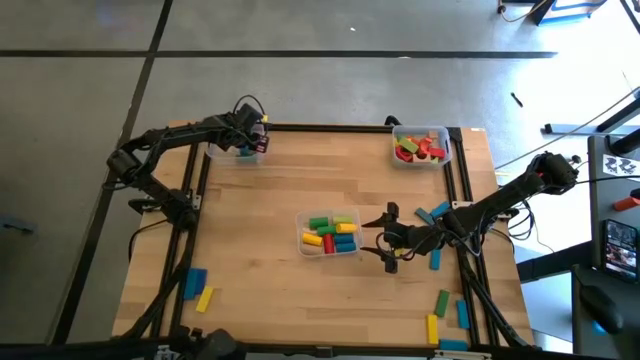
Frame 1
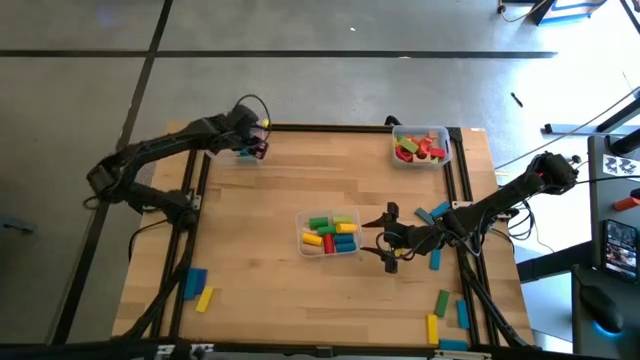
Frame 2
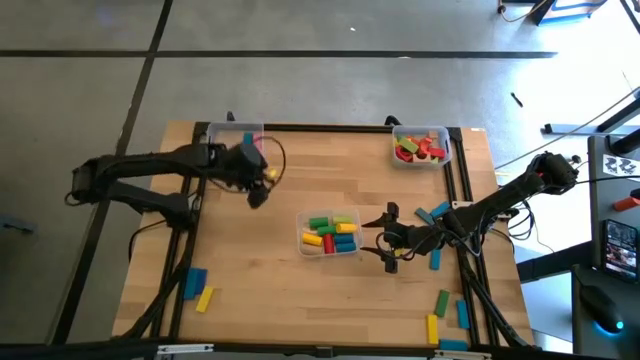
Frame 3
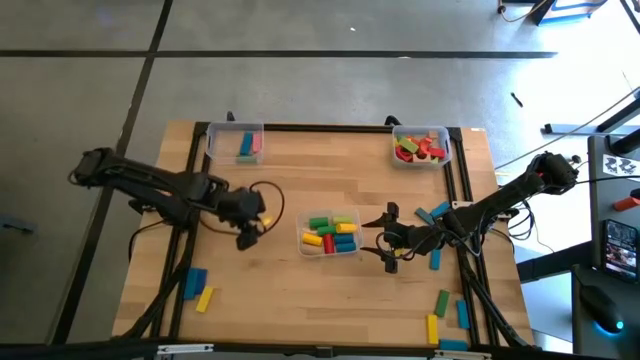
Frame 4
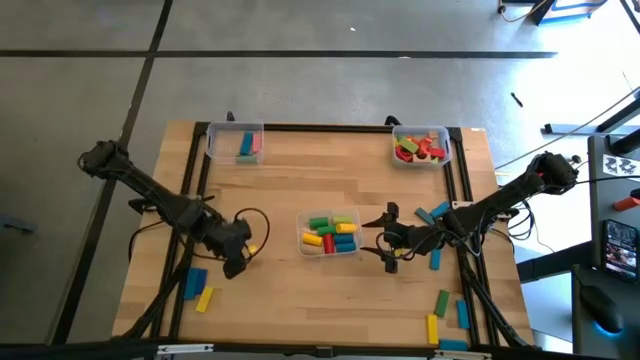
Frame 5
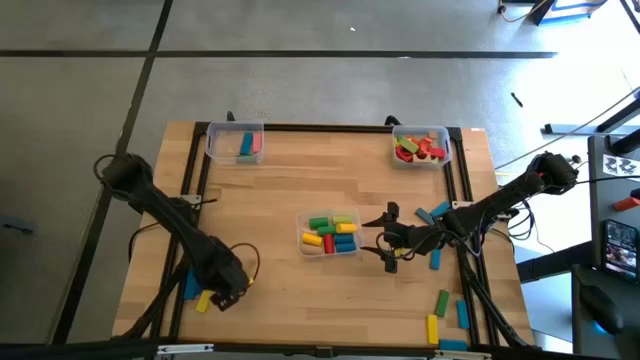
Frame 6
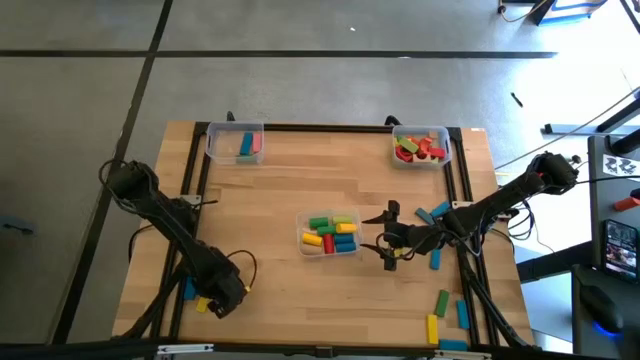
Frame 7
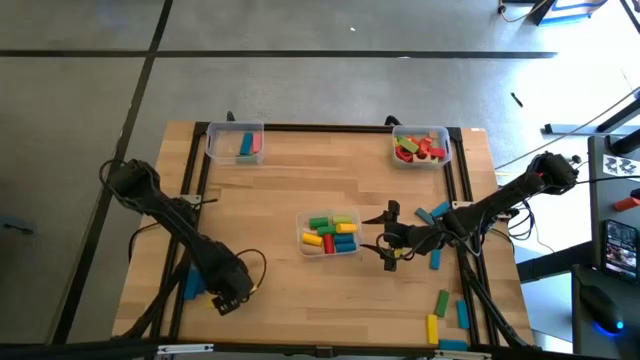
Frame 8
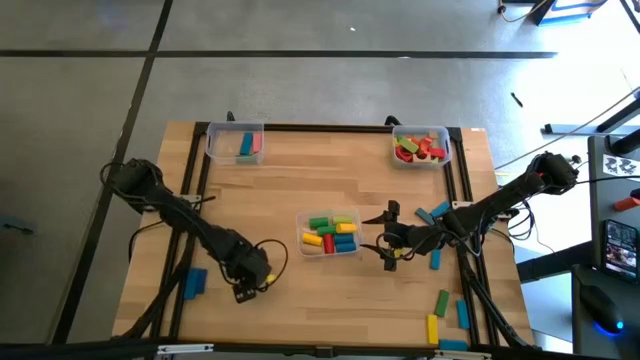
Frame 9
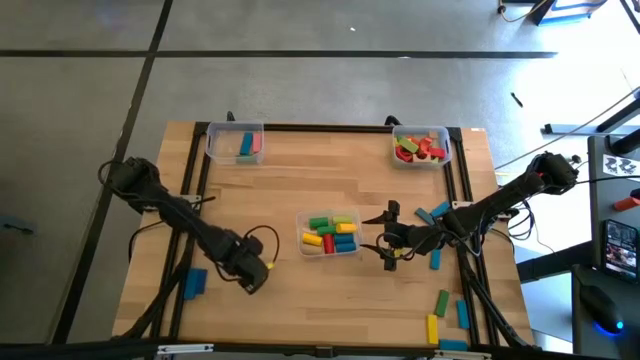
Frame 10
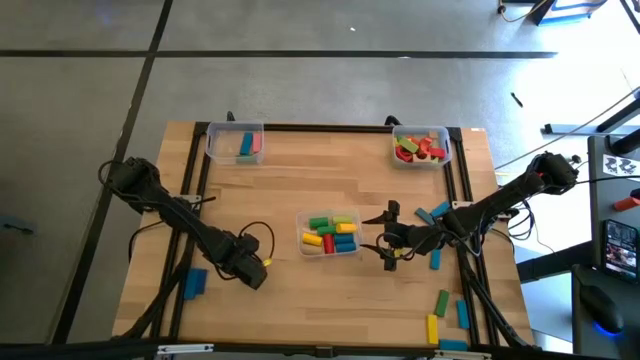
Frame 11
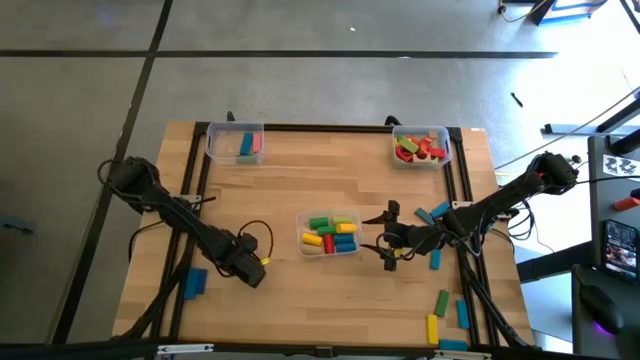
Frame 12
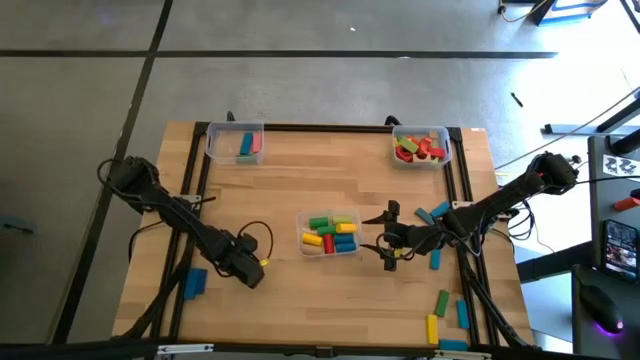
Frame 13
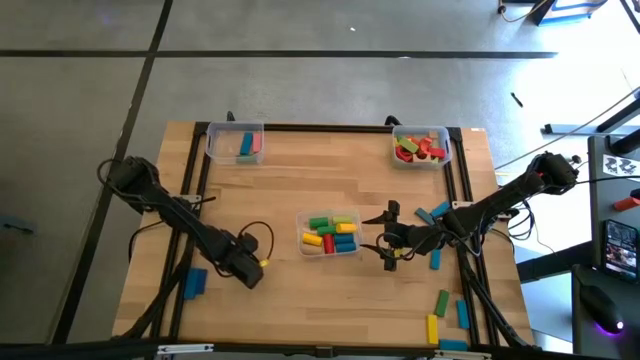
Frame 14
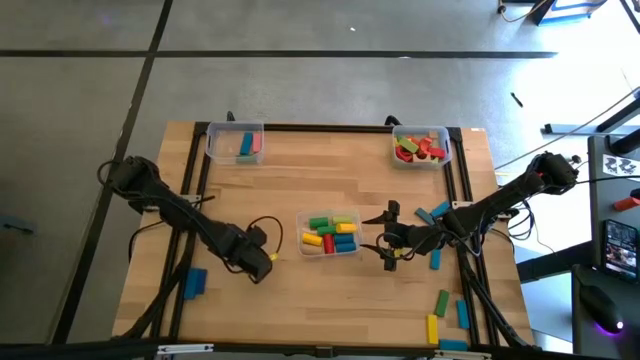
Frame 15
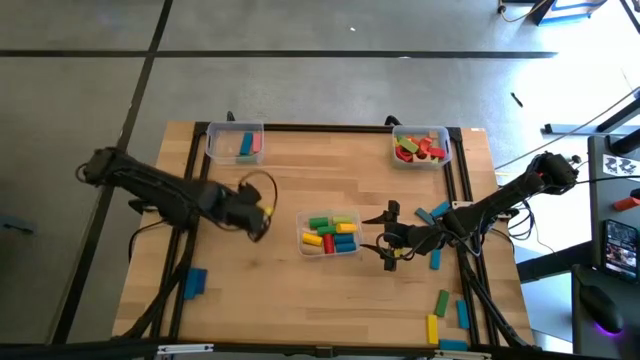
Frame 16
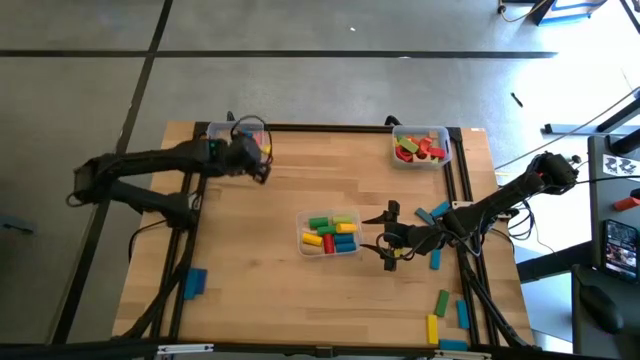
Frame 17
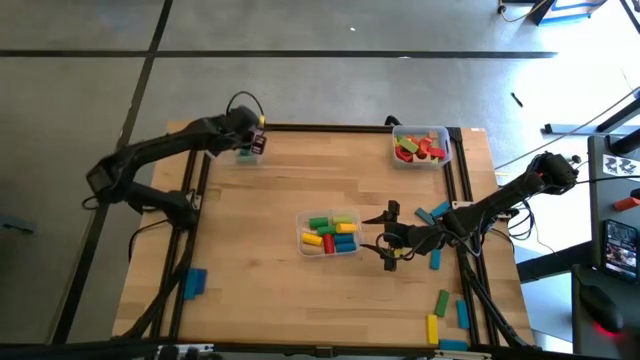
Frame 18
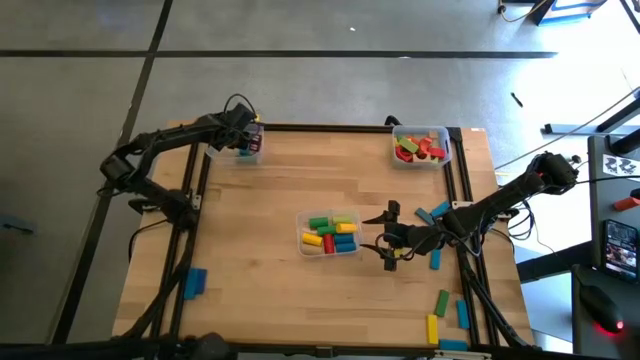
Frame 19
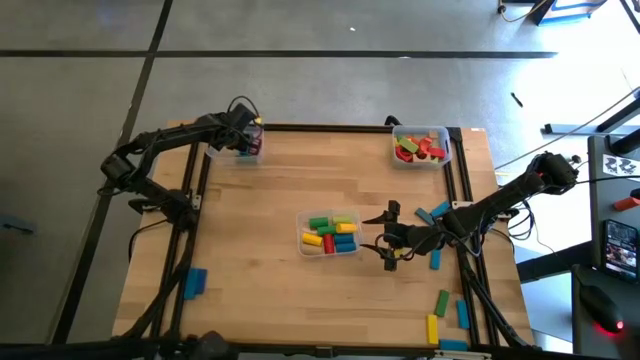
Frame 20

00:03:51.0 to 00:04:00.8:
Task: Sort blocks by size
Put the yellow rectangular block into the top left transparent bin

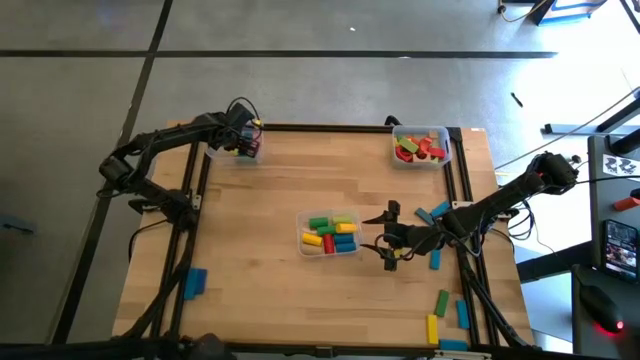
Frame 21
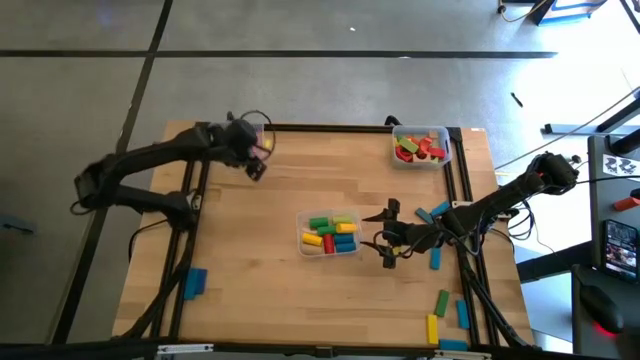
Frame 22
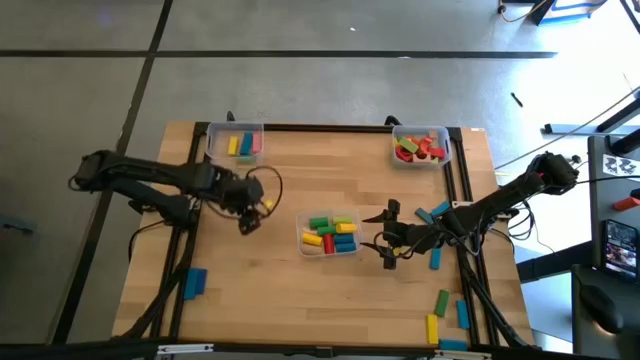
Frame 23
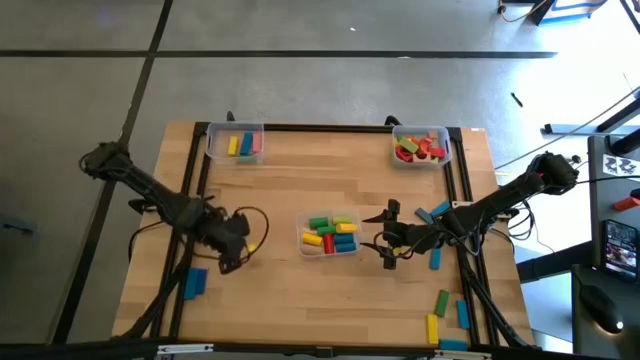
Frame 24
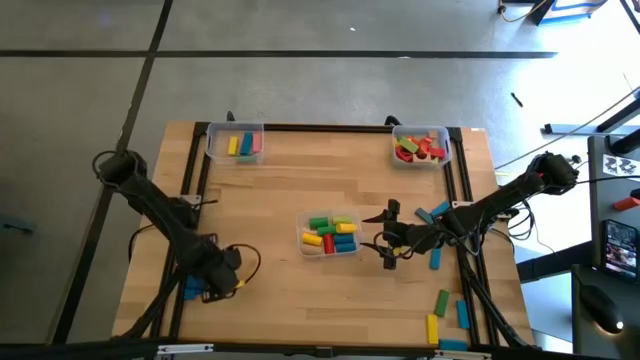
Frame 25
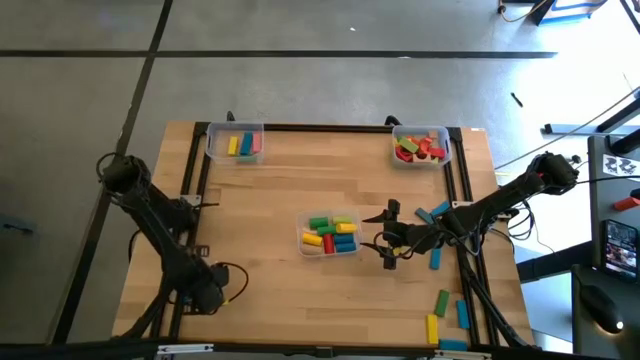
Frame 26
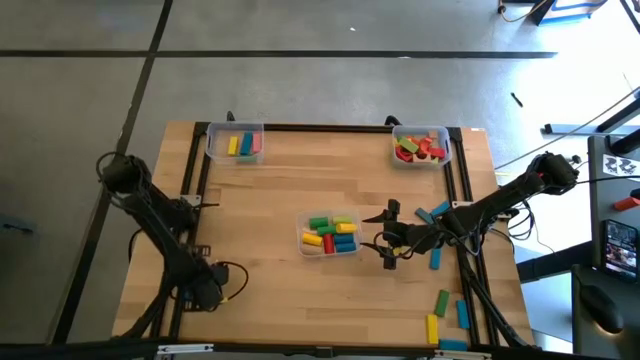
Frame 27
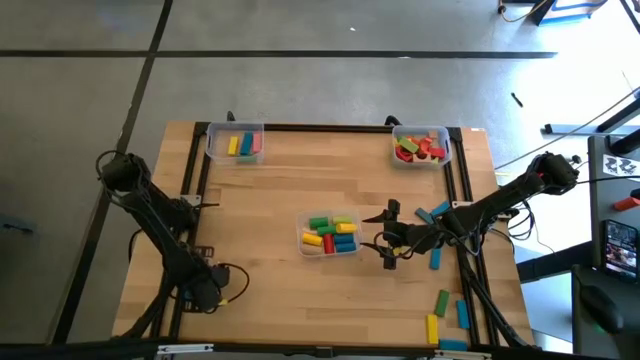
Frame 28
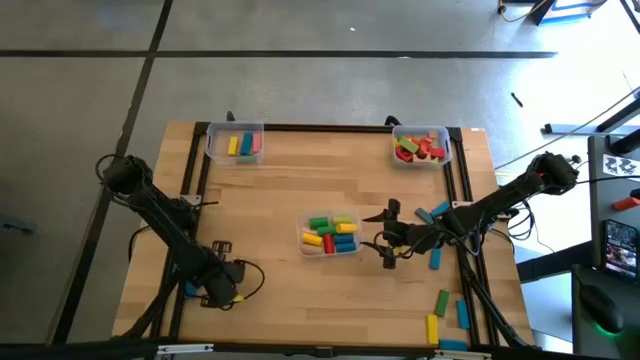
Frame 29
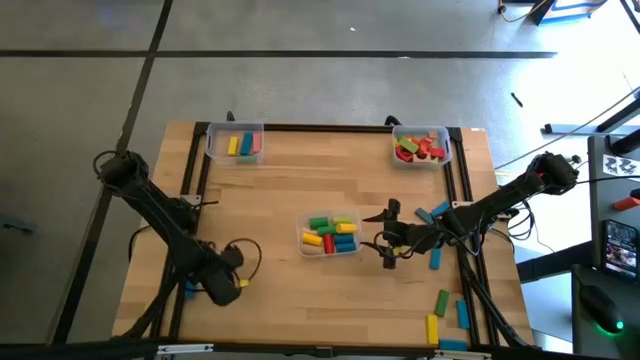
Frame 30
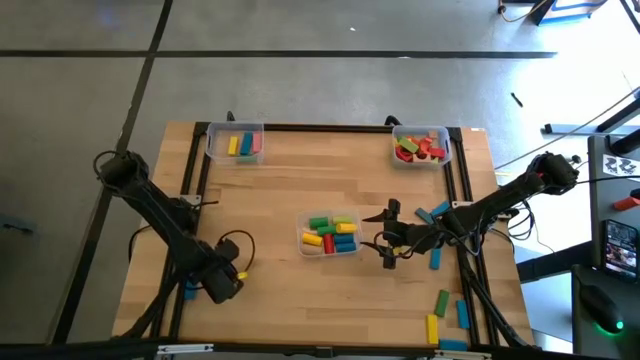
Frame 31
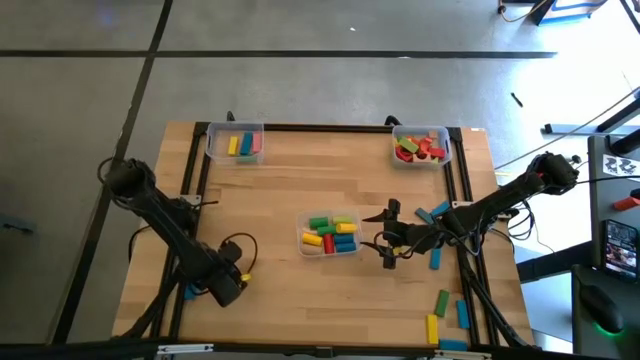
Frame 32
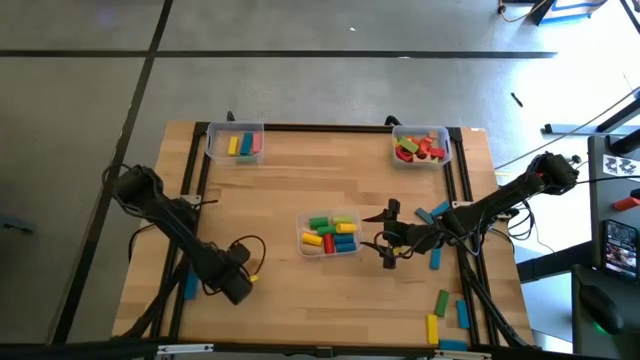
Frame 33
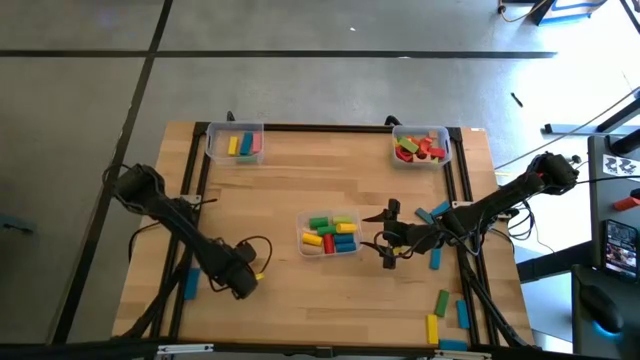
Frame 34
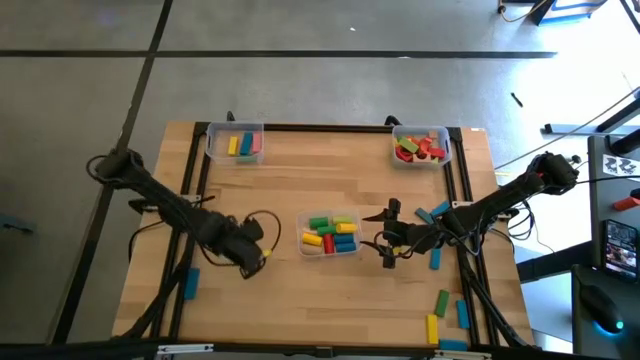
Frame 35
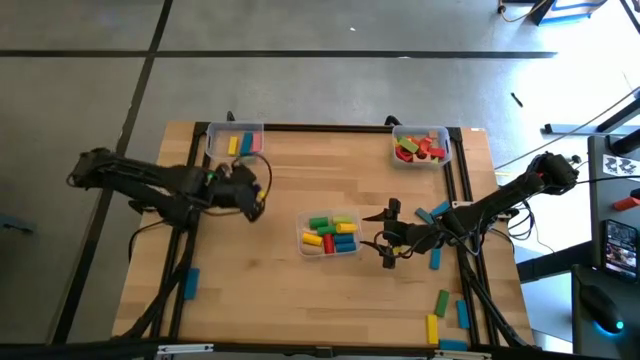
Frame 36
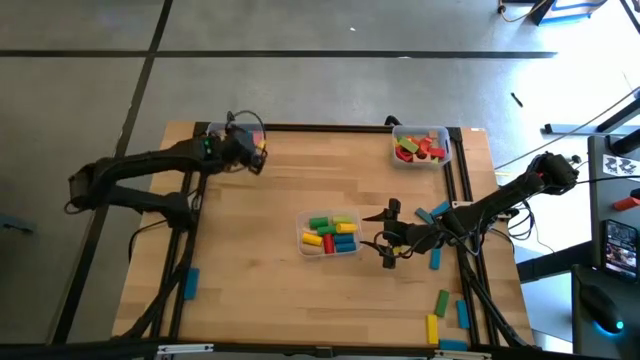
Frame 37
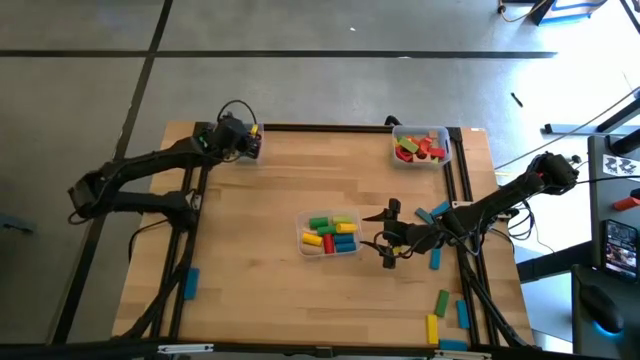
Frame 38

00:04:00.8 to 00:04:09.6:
Put the blue rectangular block into the top left transparent bin

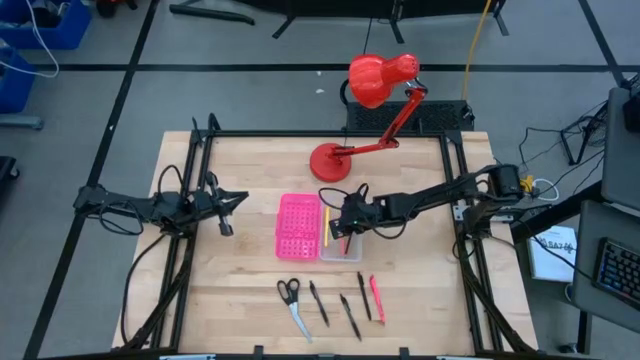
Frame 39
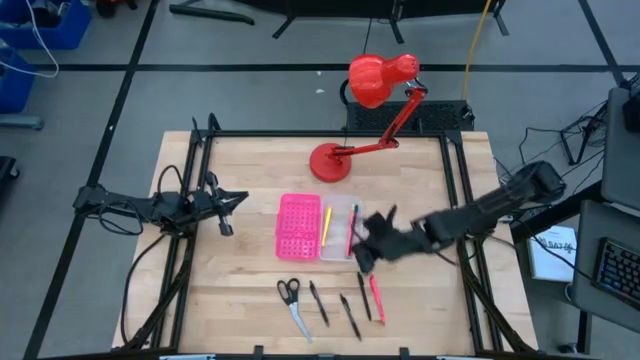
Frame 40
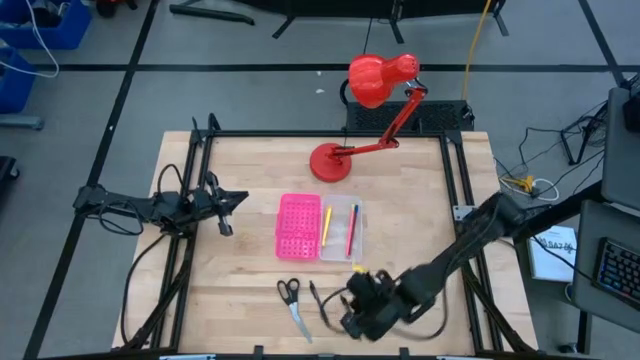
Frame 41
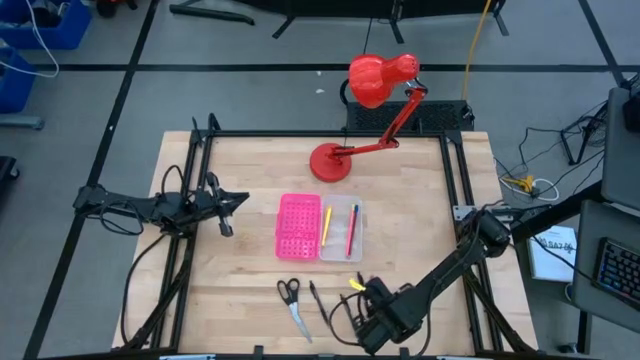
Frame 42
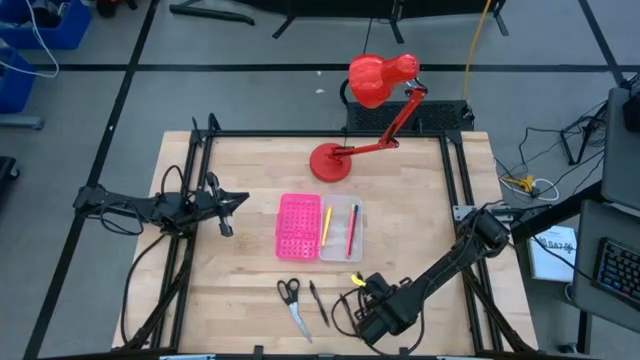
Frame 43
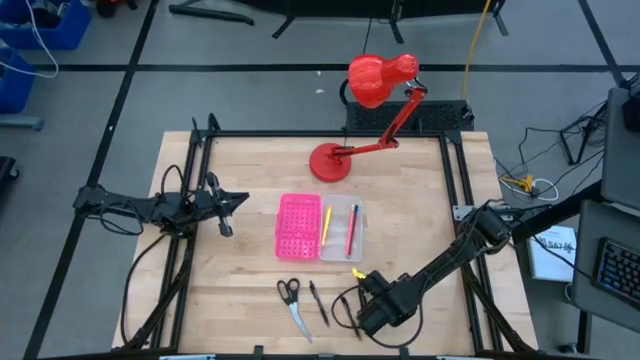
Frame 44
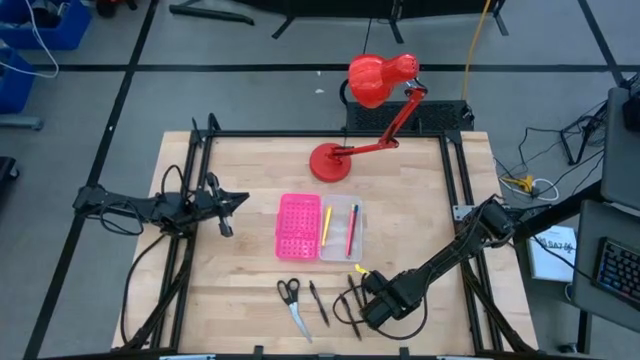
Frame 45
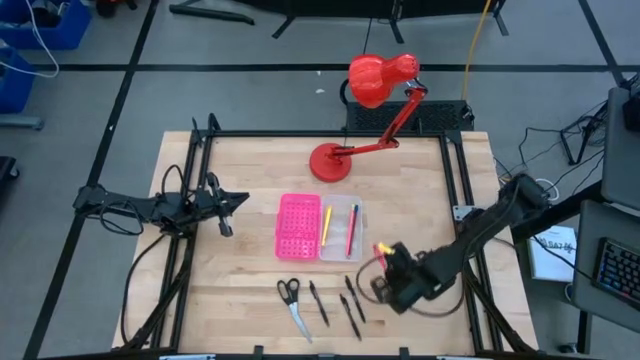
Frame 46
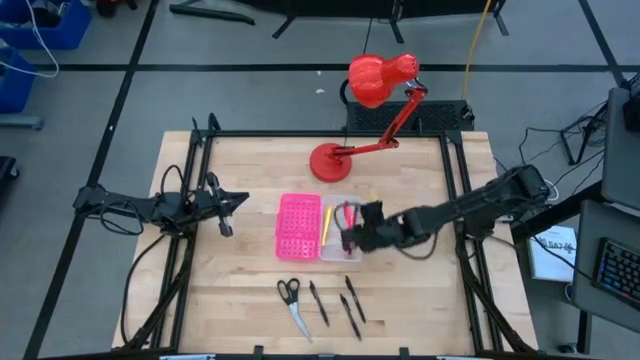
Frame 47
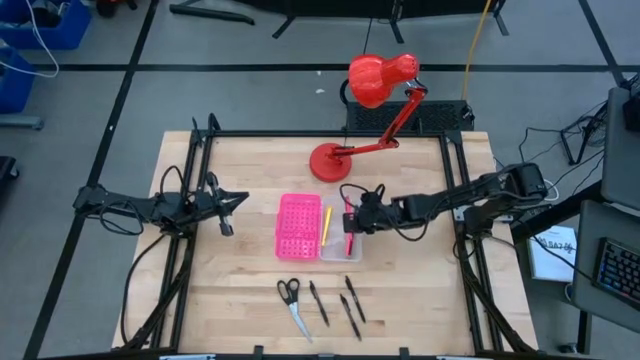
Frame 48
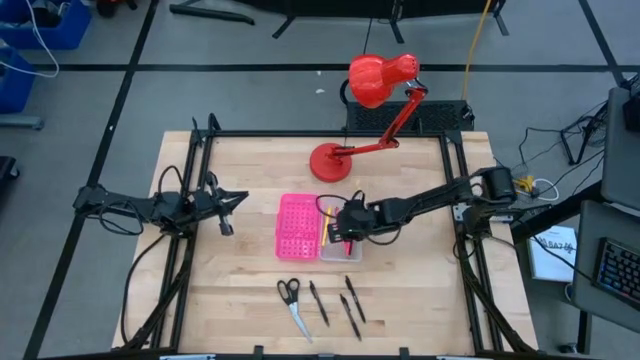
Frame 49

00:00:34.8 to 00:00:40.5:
Task: Pick & place school supplies into a supply box
Put the pink pen into the pink supply box
